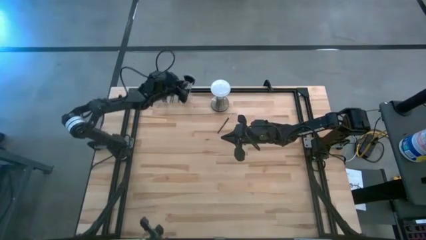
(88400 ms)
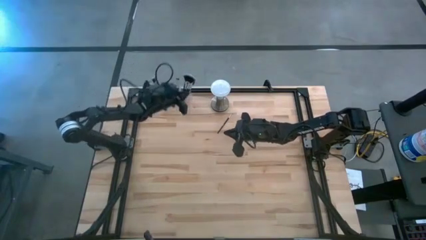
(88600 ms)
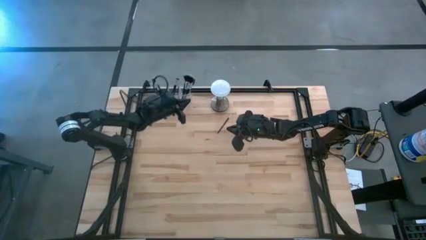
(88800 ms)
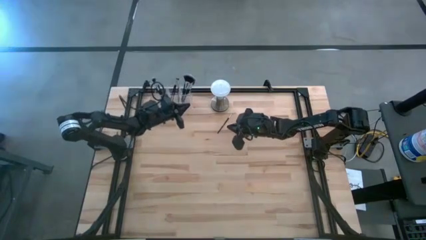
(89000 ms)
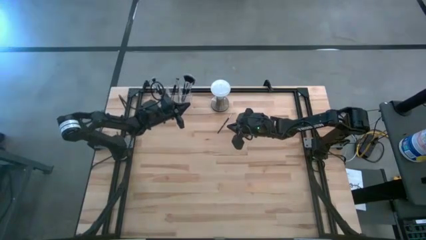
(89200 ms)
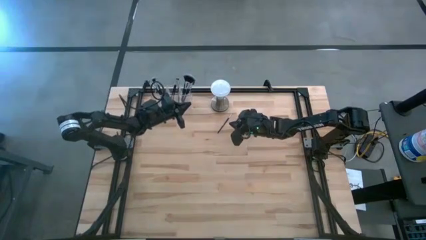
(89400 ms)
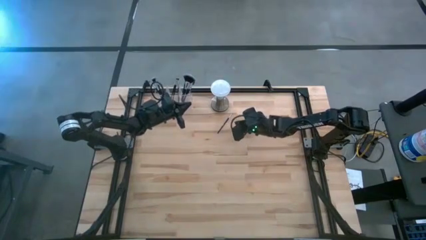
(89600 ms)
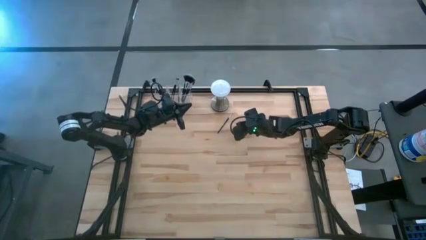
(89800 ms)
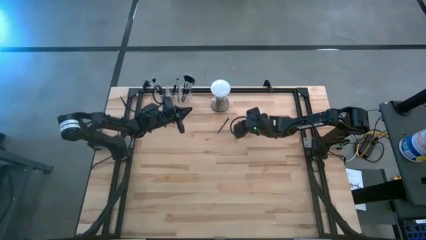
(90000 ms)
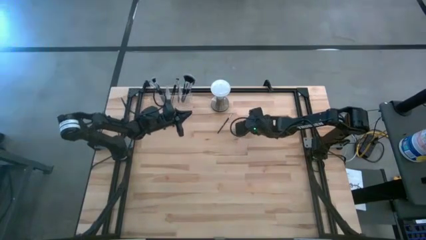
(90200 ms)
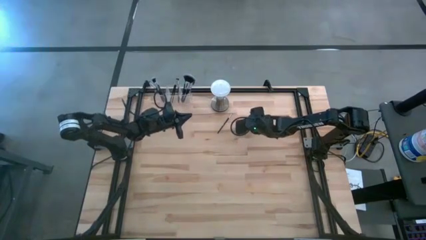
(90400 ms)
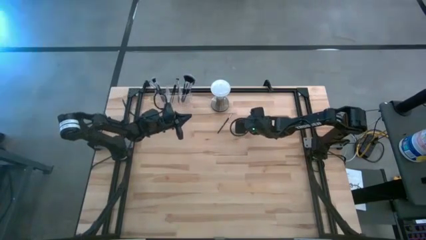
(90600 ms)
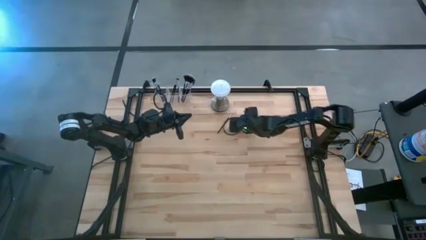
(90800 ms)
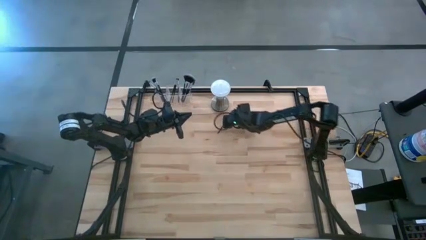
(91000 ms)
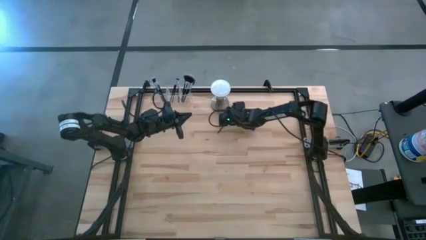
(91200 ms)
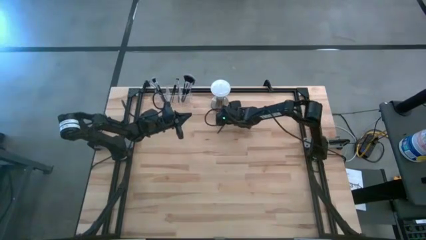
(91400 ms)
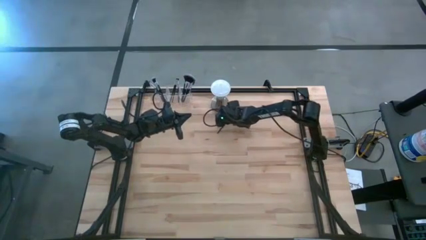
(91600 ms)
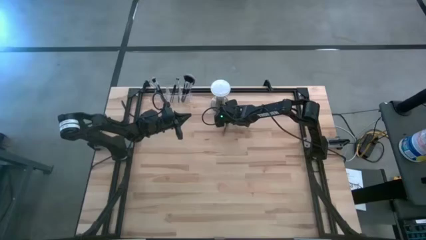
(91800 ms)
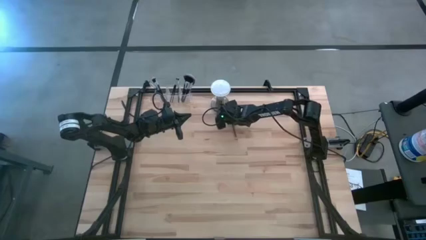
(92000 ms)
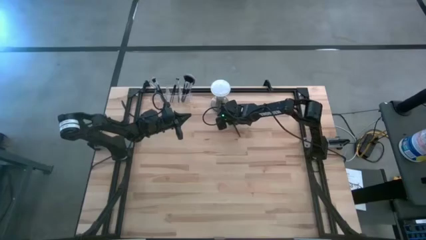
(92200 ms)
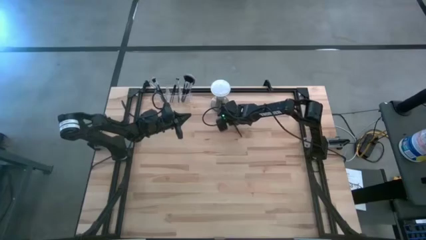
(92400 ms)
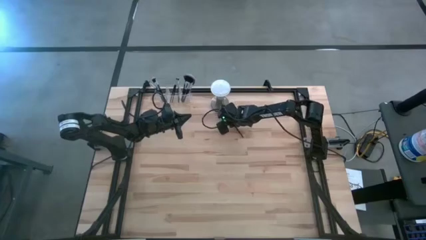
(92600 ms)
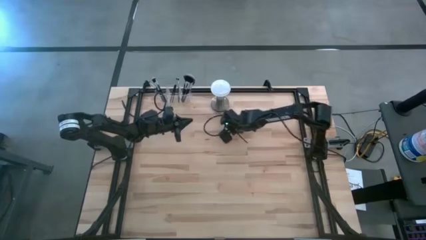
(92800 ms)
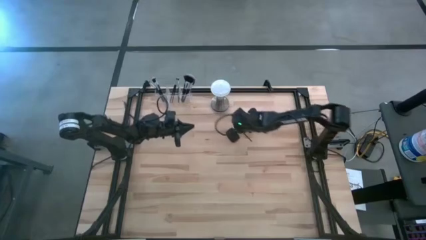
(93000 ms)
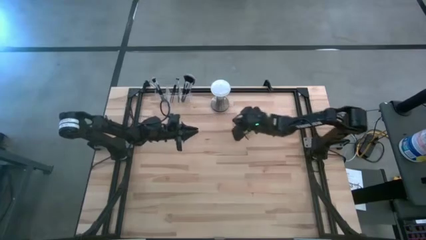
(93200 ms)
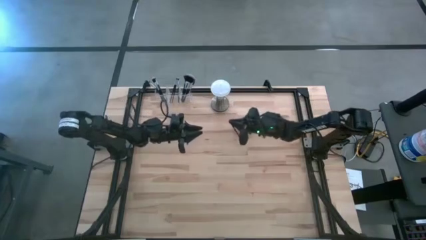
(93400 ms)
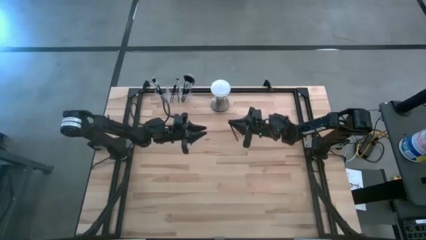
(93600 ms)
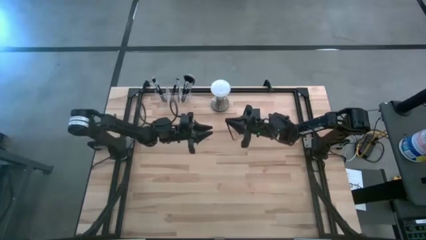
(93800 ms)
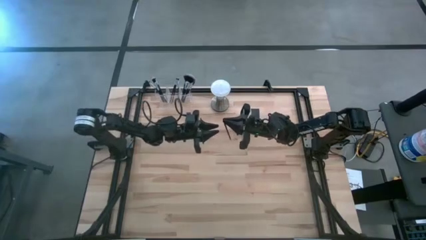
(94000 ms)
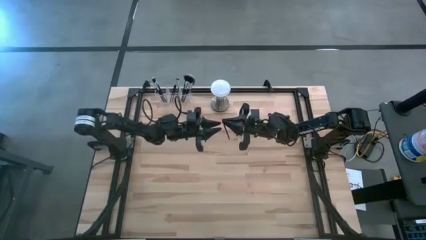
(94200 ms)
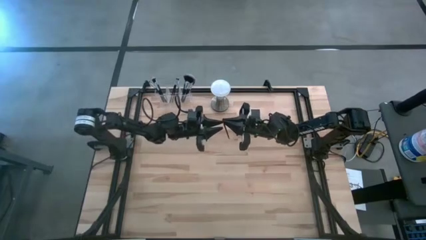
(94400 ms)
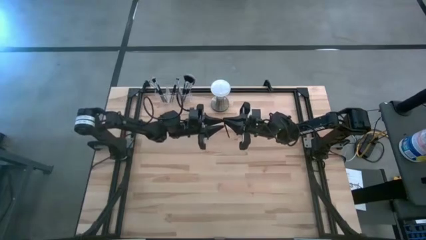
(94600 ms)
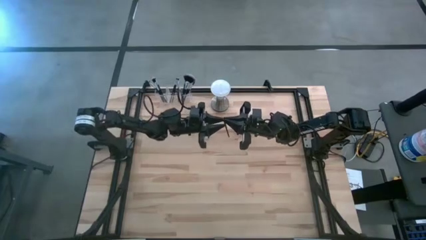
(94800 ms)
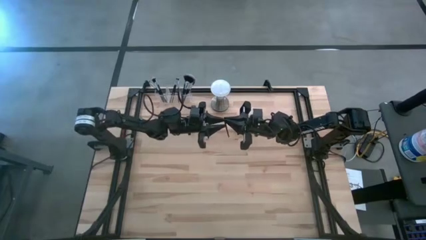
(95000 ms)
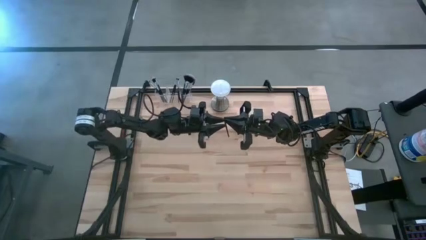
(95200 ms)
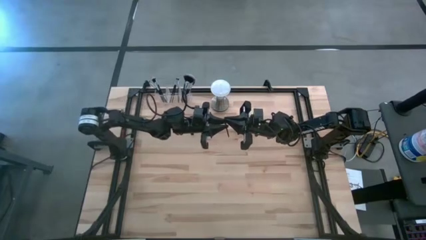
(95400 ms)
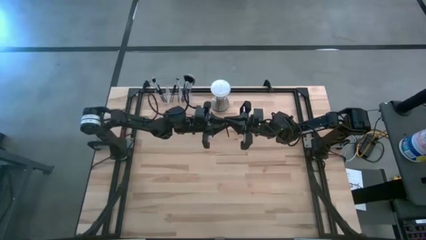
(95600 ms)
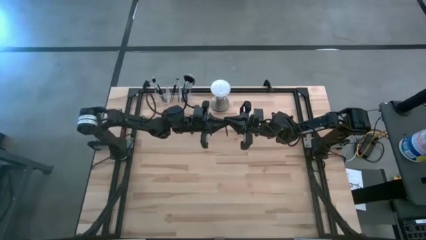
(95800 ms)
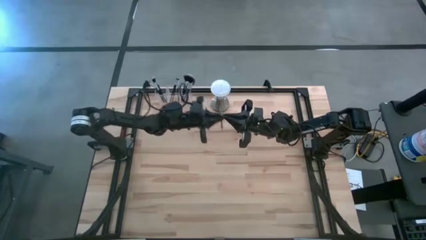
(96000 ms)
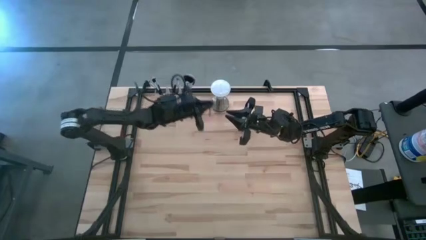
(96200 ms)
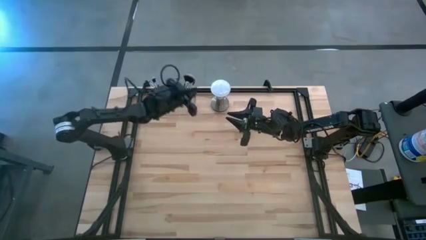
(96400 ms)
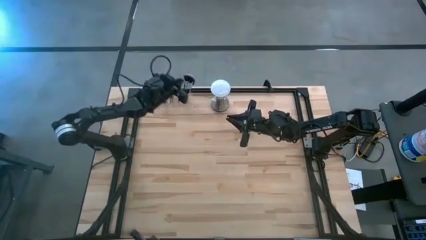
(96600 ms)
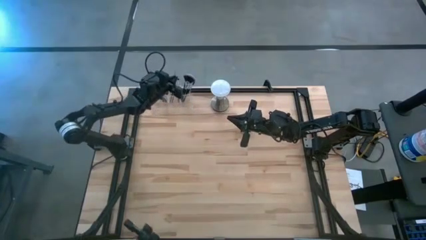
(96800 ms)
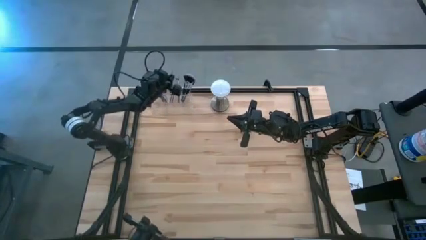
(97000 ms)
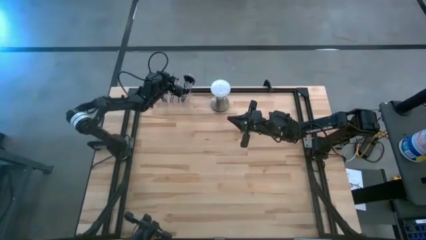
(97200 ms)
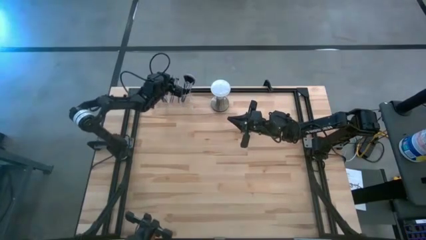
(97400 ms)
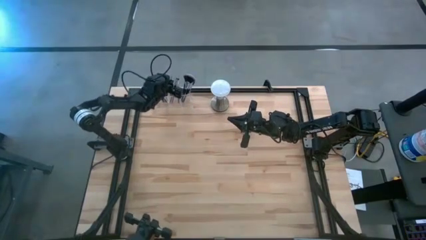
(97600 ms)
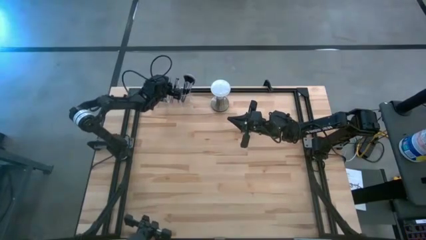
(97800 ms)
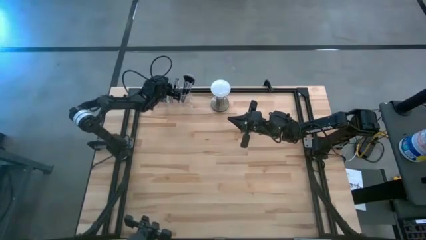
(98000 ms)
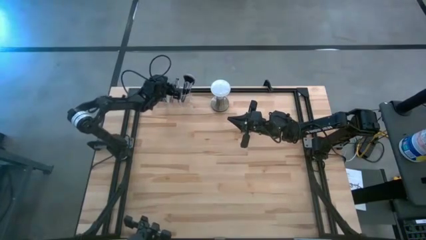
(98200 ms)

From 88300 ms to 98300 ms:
Task: Put items in baskets/containers
Put the liner brush into the middle section of the transparent organizer

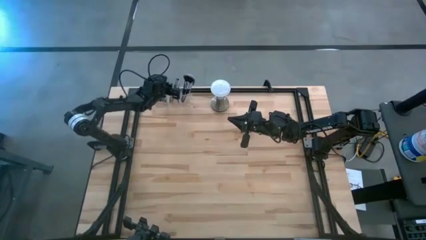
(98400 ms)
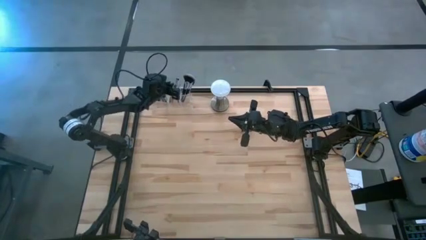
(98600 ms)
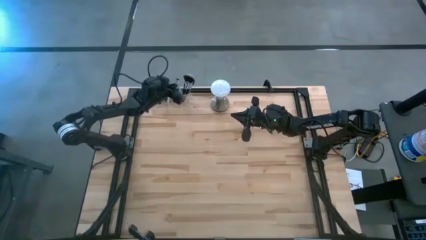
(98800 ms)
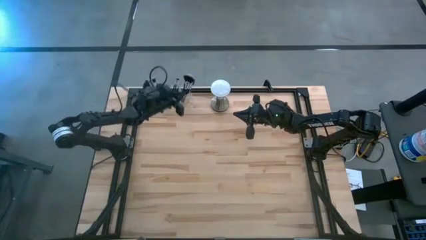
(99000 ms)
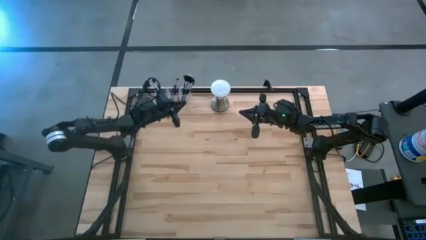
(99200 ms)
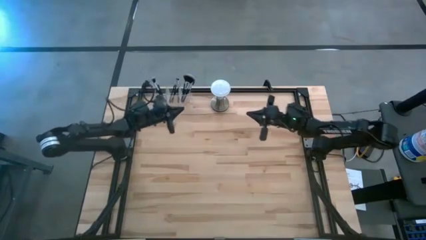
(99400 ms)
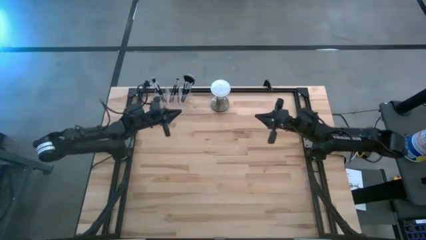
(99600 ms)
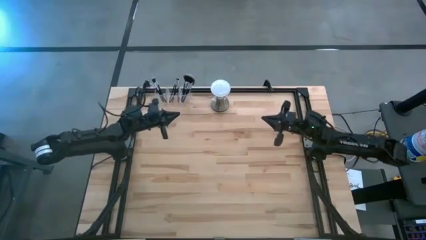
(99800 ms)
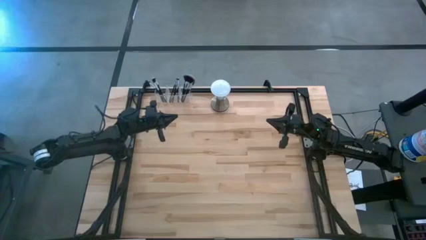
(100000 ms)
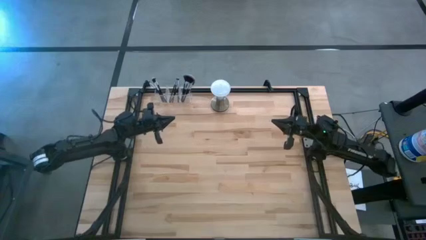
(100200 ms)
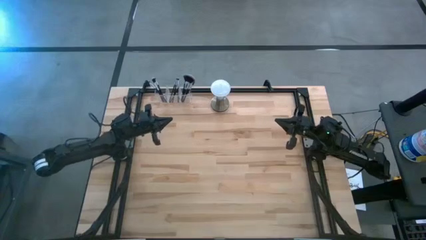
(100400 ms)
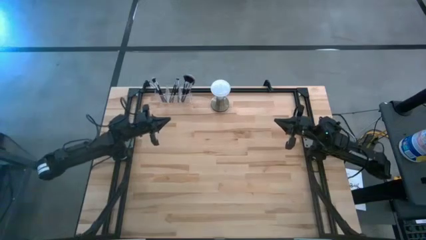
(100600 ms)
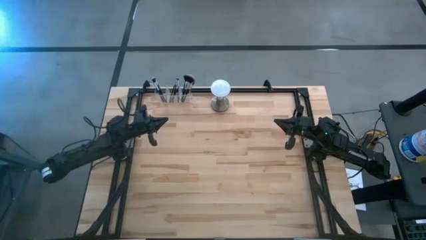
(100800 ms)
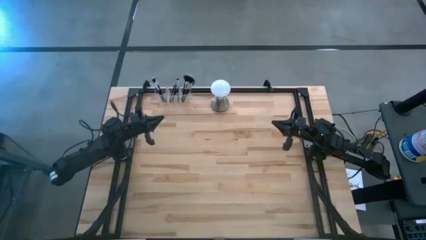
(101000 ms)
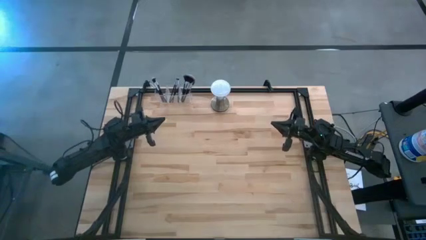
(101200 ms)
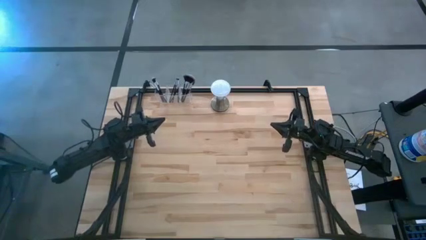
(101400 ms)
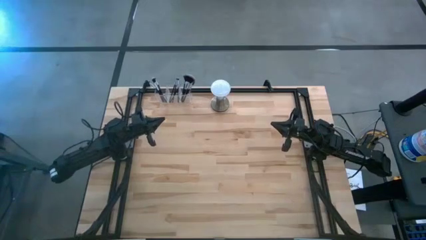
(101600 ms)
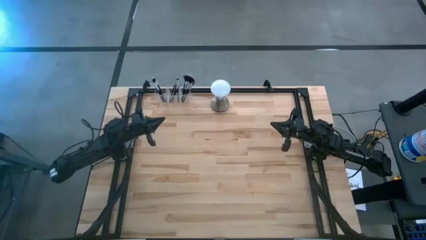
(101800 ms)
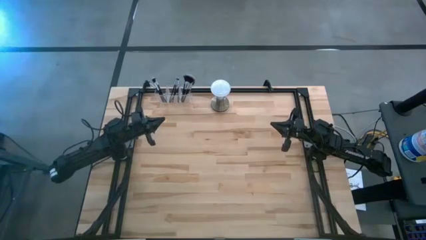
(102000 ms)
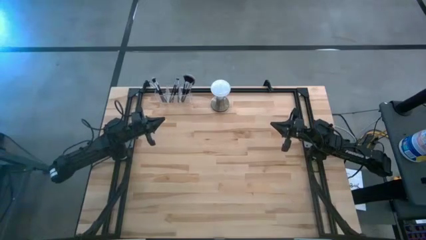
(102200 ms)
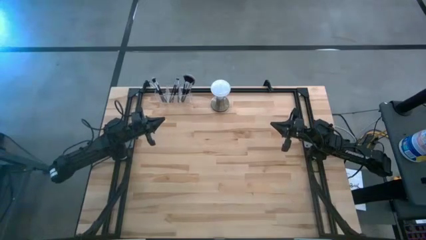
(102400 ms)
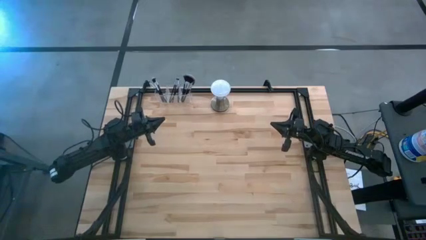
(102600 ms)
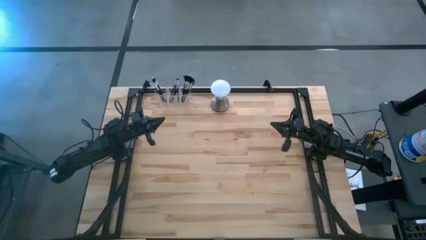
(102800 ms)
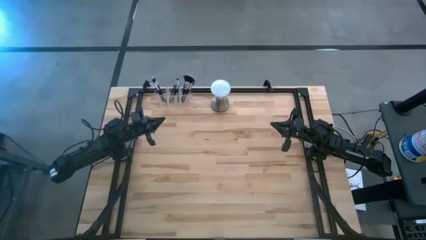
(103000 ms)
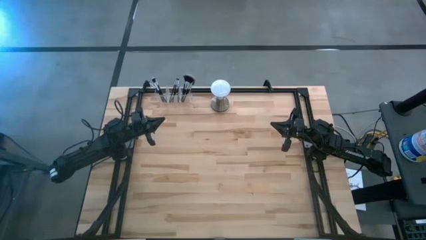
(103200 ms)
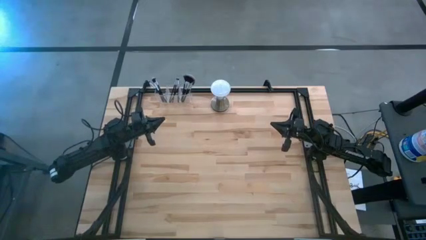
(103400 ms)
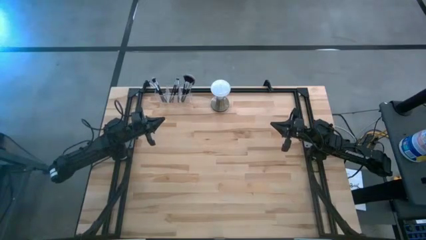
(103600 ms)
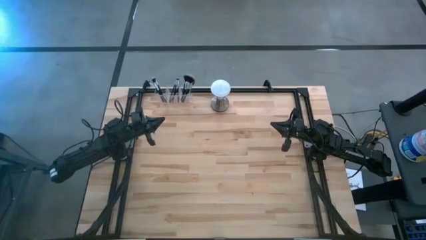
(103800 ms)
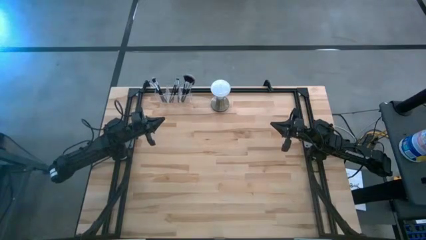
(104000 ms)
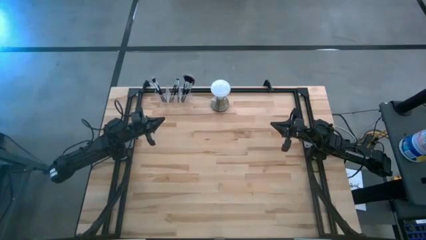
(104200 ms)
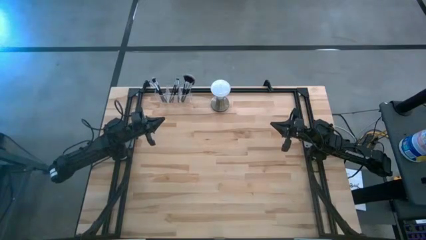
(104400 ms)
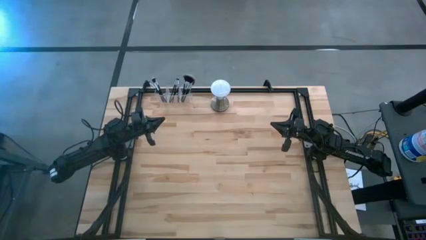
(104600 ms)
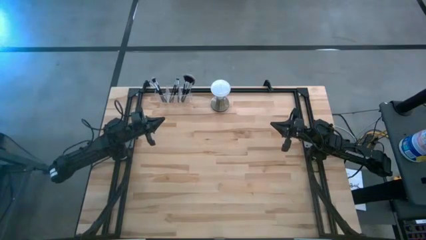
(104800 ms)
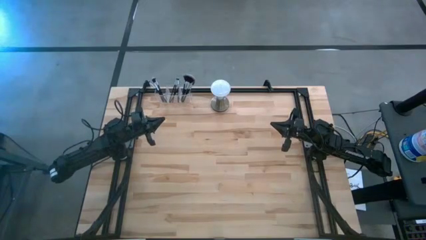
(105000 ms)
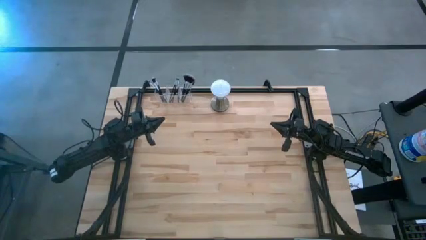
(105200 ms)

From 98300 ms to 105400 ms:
Return to Home Position
